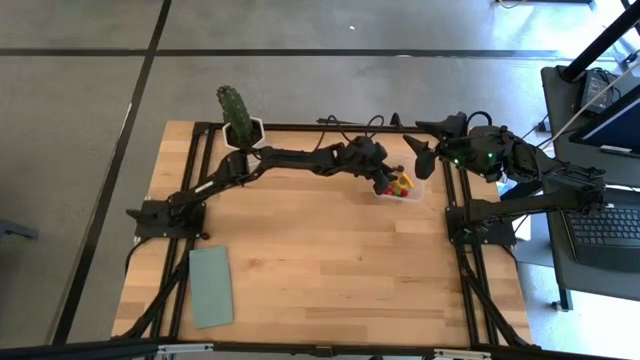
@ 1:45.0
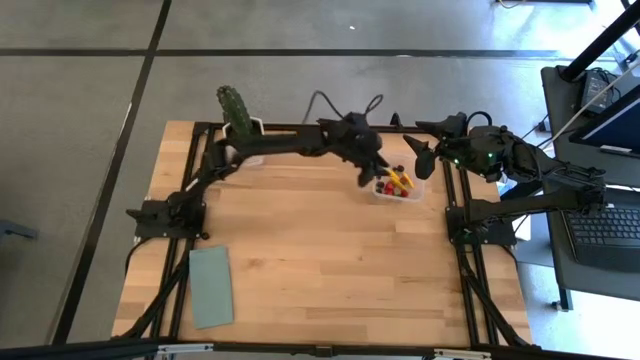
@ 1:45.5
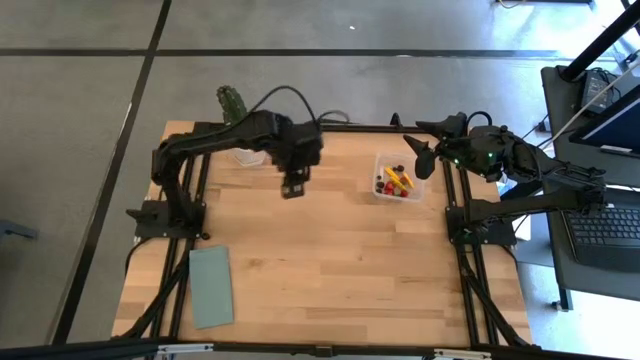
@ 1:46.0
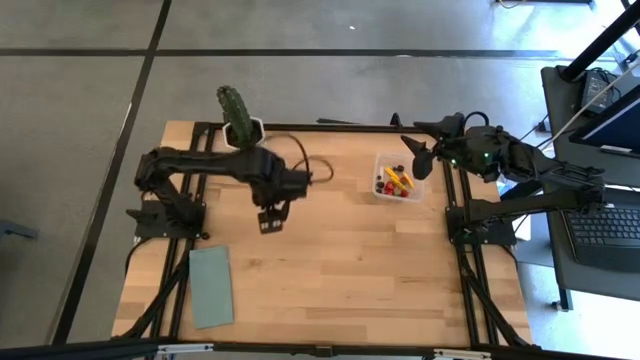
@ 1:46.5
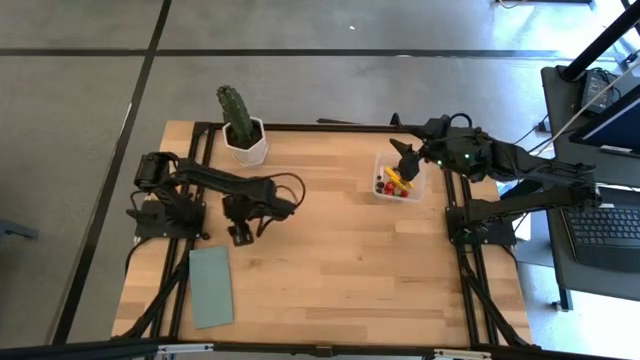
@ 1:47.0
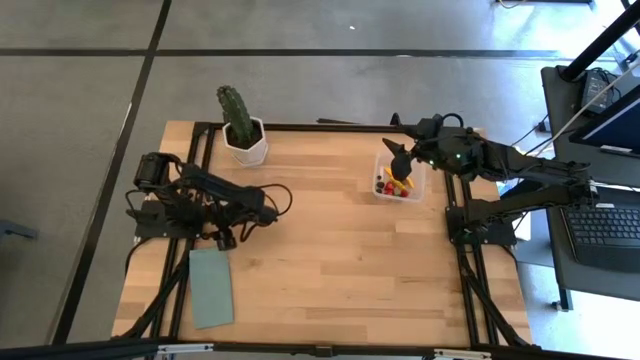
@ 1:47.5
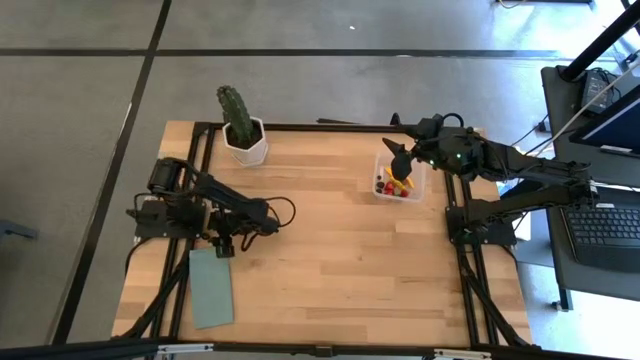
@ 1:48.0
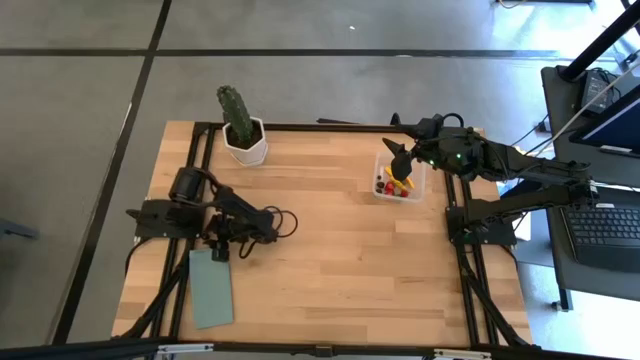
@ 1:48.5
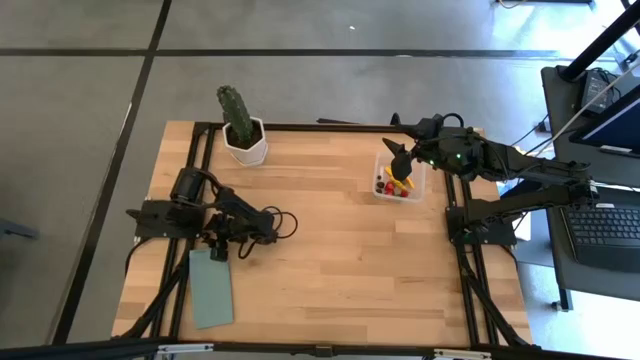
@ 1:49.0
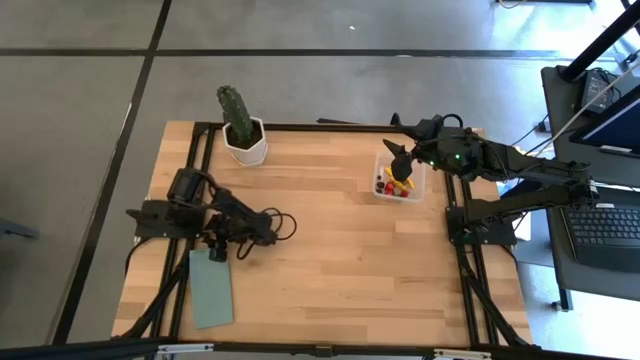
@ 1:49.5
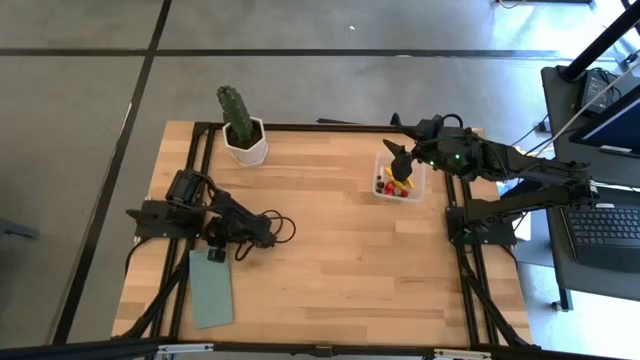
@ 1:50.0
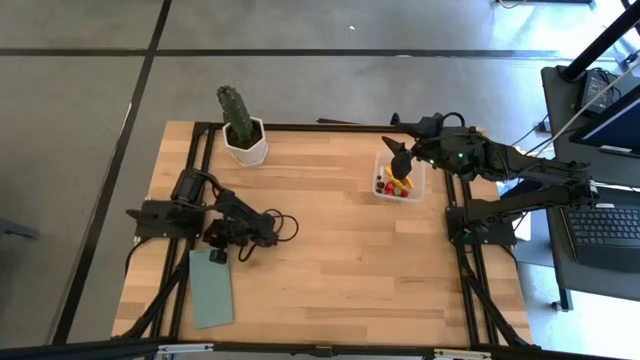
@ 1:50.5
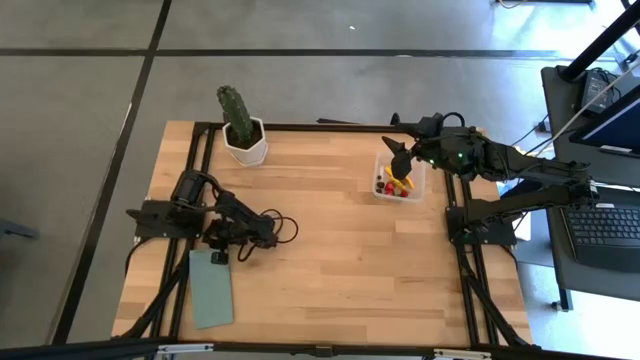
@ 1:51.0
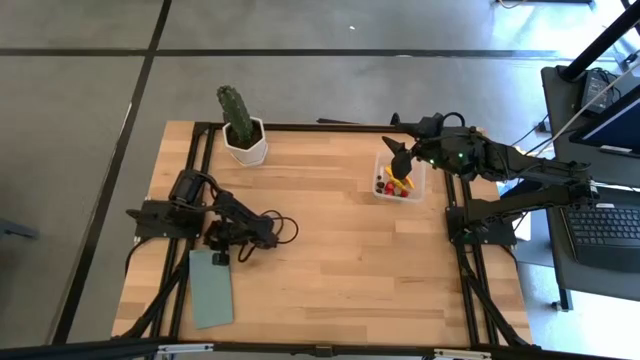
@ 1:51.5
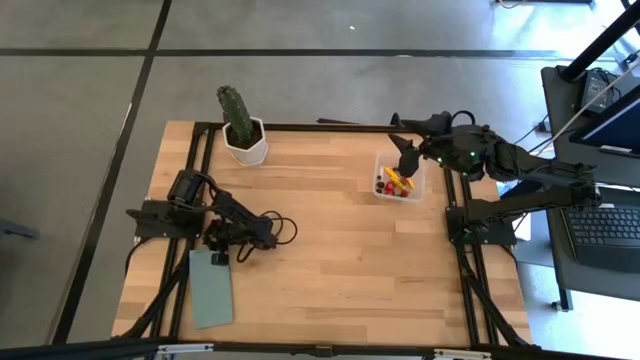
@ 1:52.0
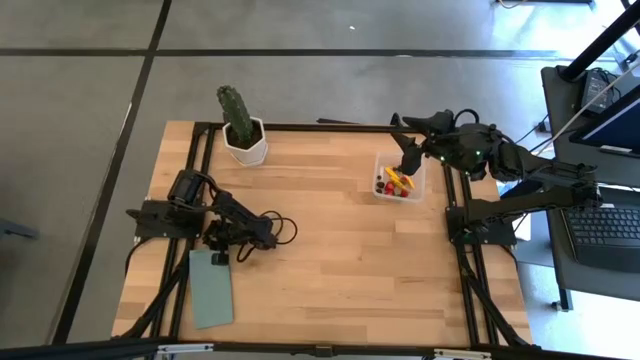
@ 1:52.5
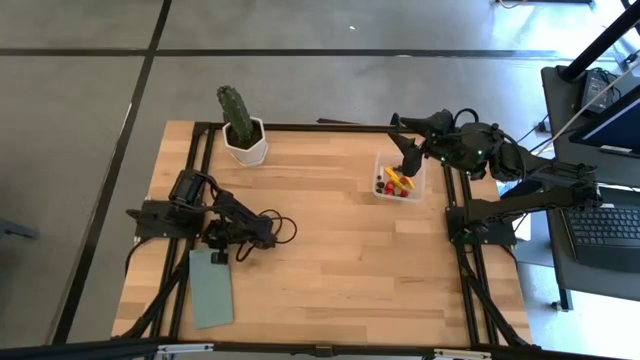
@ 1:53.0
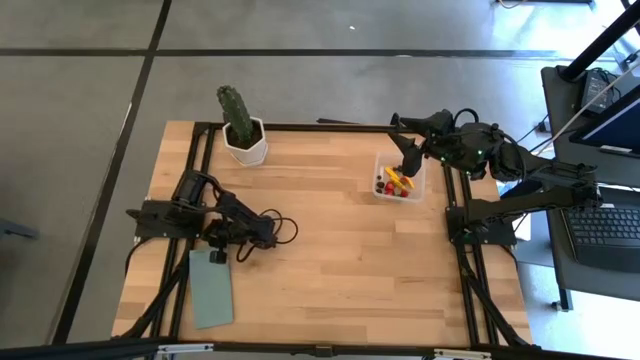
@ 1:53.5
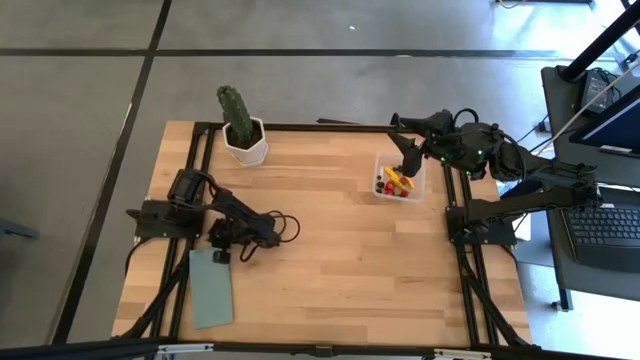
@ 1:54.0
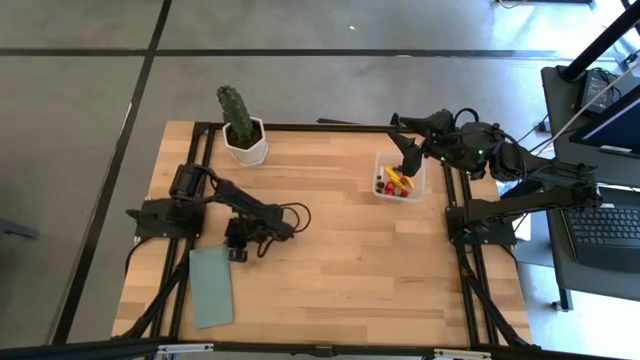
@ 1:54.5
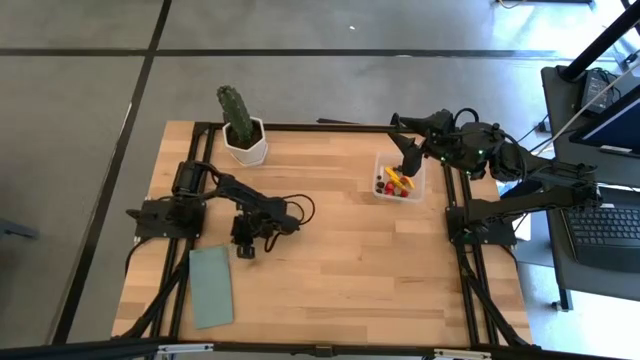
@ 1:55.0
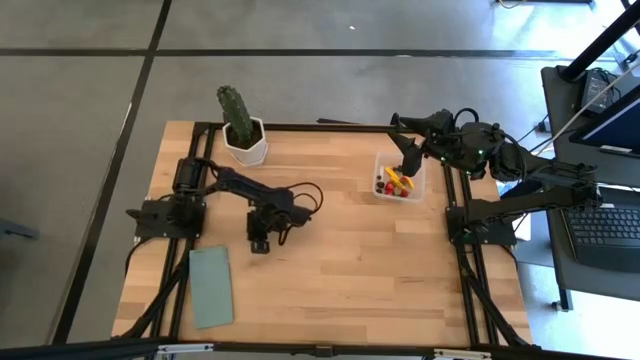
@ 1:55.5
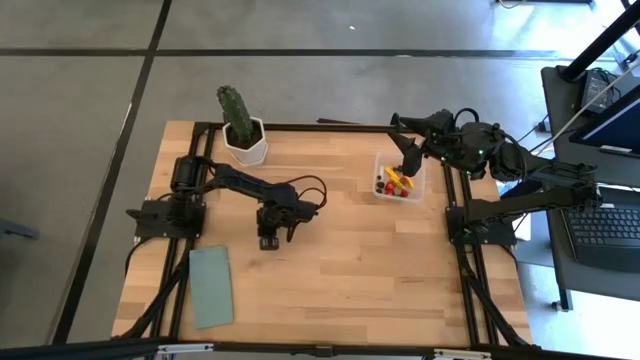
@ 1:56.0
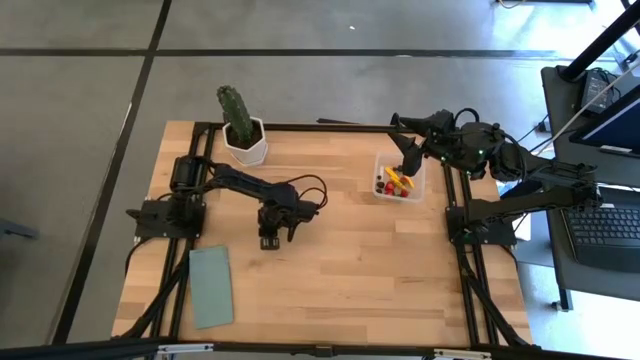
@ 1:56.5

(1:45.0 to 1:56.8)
Task: Pick and placing Produce into tupperware
Put the black cherry into the transparent bin

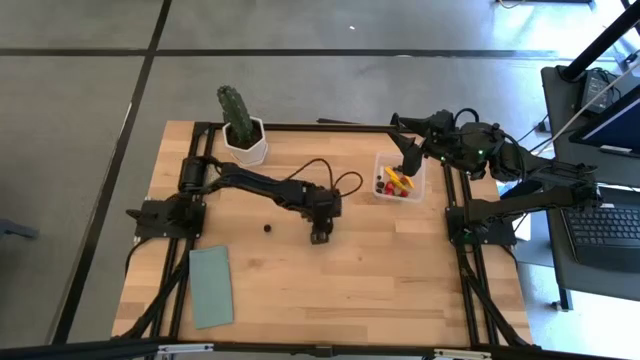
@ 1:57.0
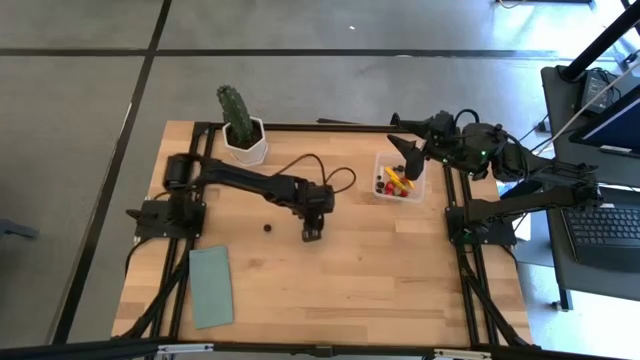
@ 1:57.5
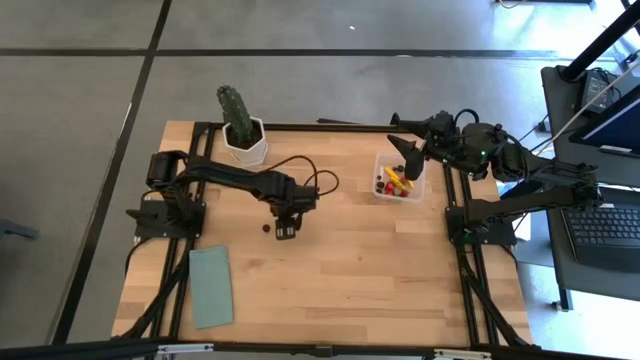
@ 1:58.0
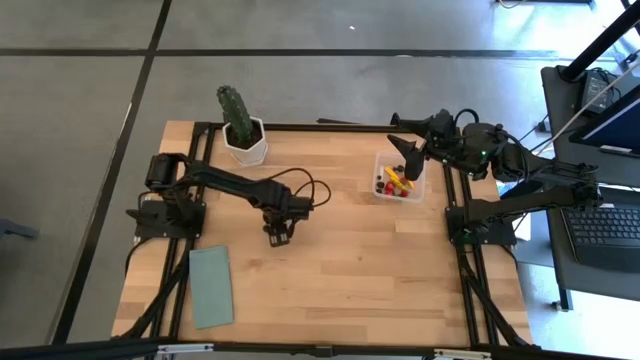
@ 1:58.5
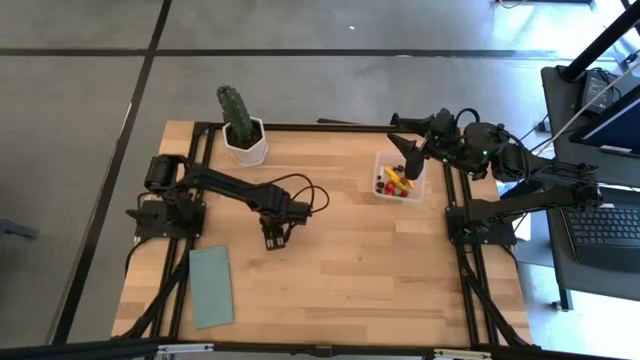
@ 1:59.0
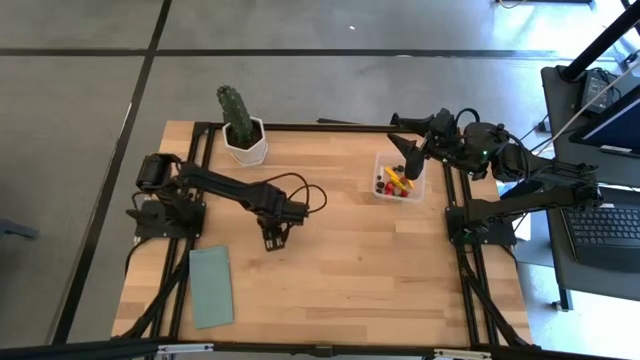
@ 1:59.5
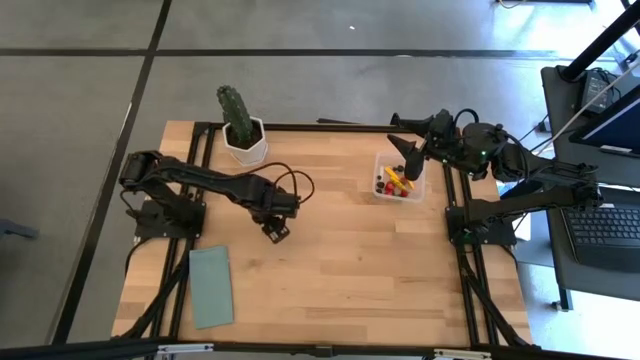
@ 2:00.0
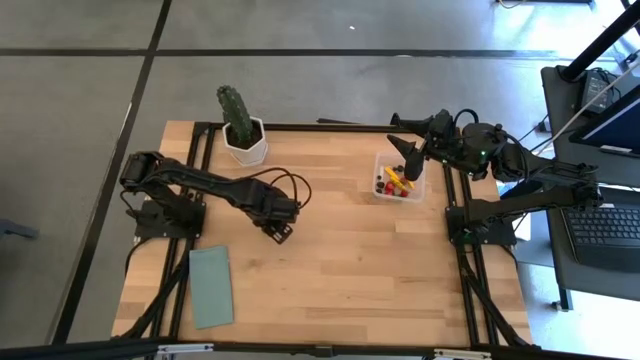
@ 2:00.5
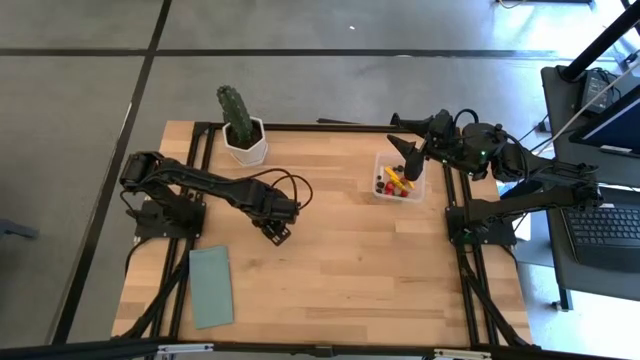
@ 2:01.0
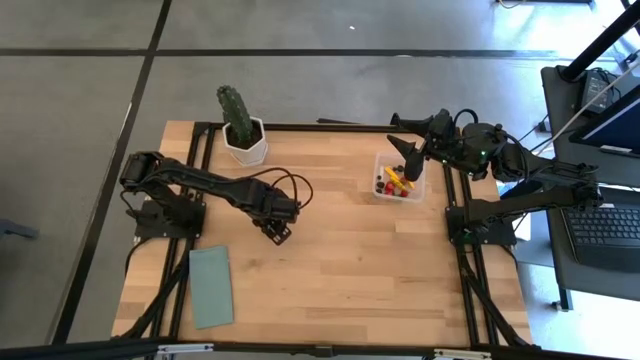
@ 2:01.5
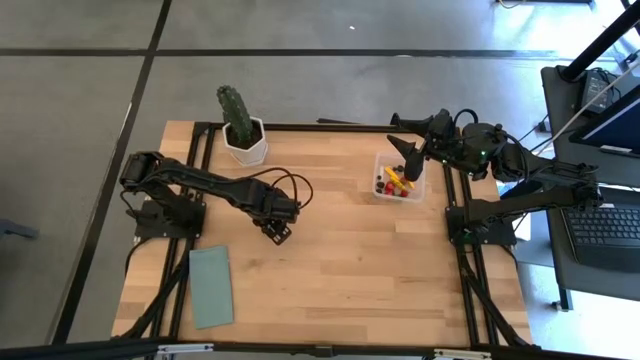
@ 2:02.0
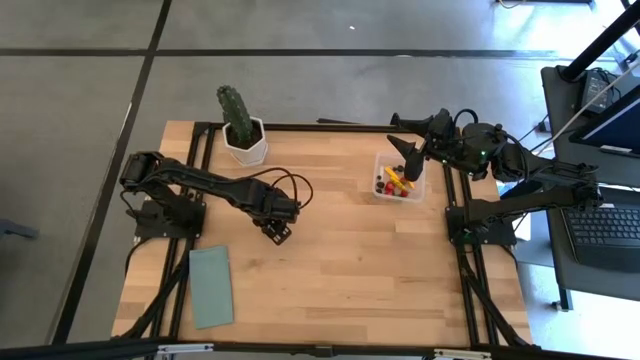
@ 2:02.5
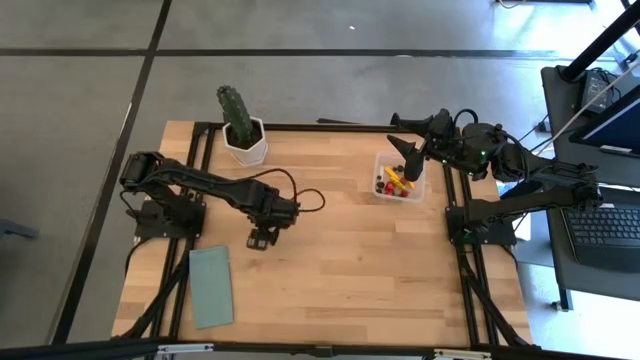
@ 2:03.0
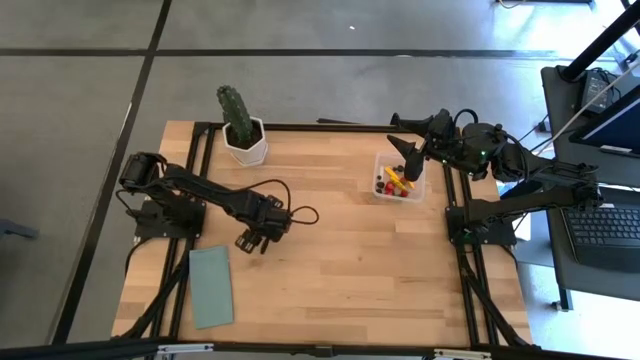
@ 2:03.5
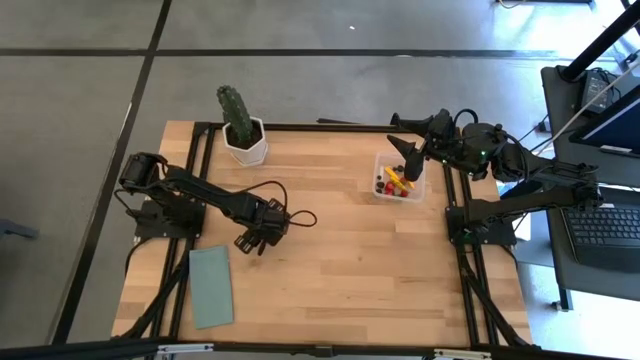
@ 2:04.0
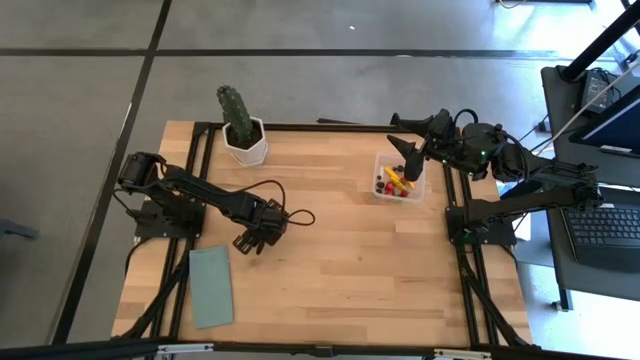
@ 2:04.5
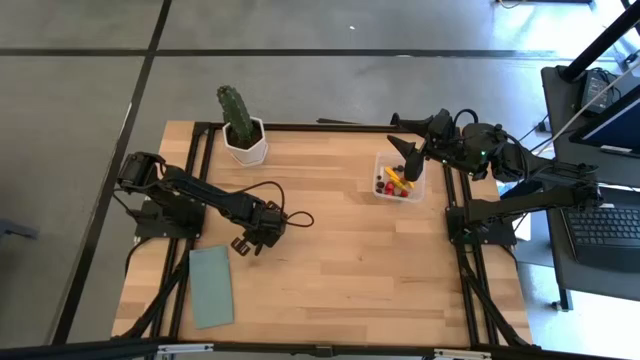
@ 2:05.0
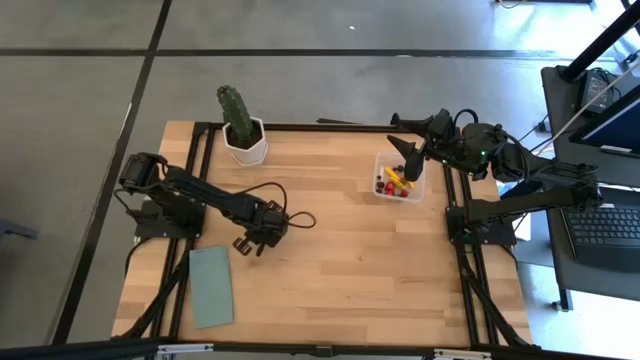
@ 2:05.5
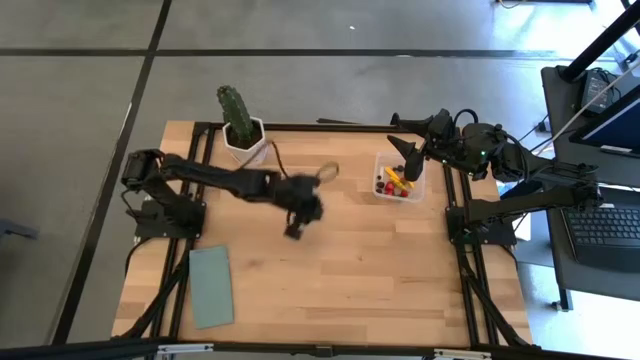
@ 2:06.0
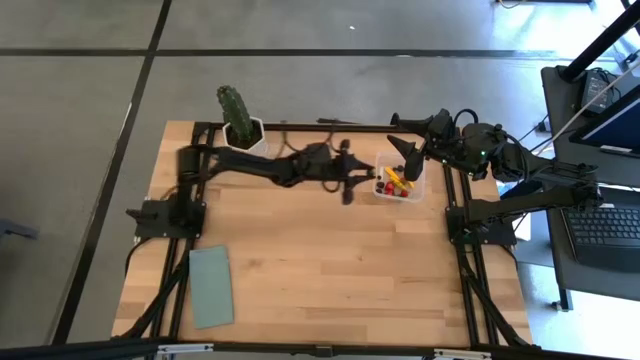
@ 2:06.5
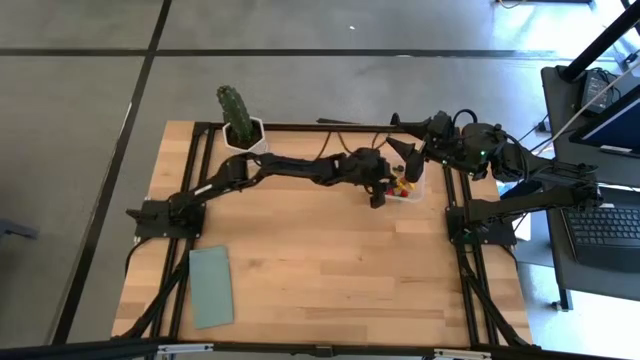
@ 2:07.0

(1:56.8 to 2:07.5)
Put the black cherry into the transparent bin
